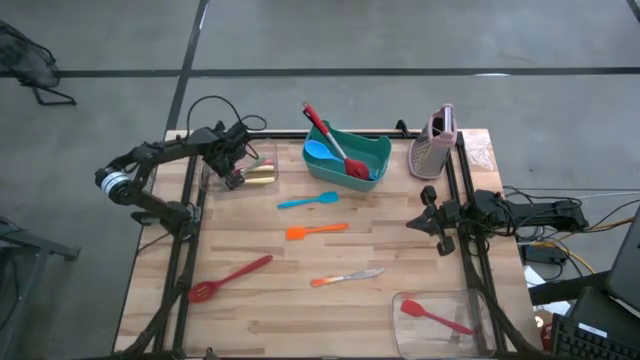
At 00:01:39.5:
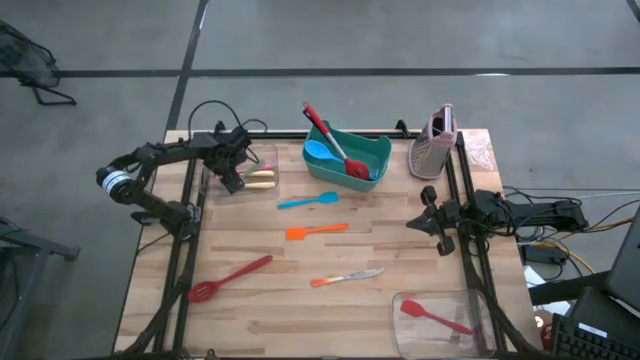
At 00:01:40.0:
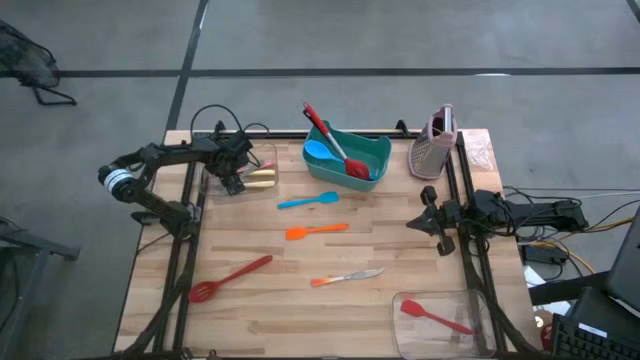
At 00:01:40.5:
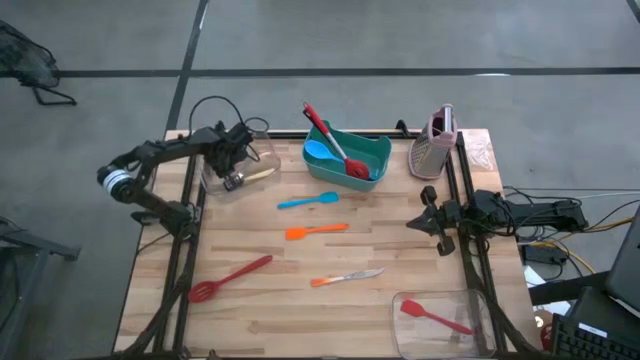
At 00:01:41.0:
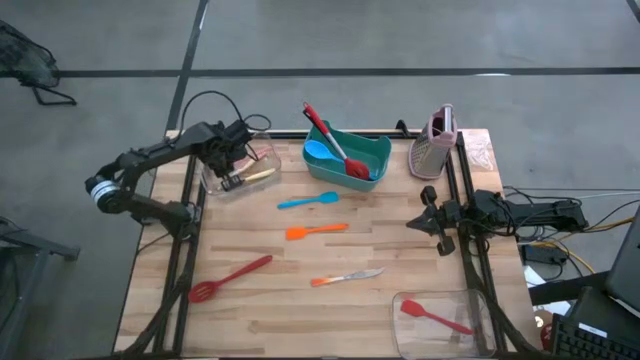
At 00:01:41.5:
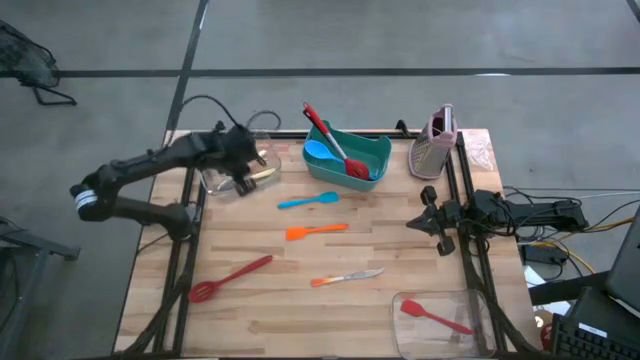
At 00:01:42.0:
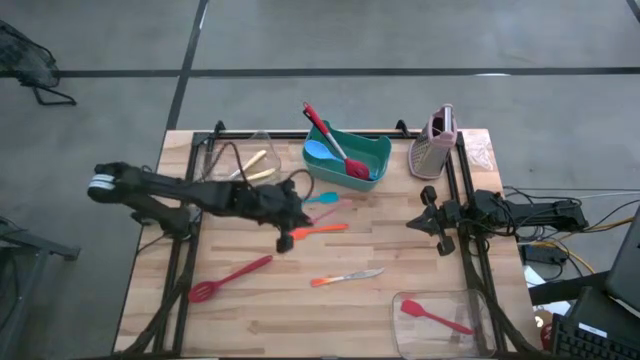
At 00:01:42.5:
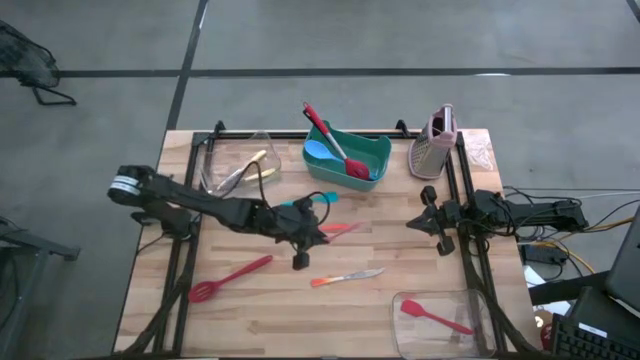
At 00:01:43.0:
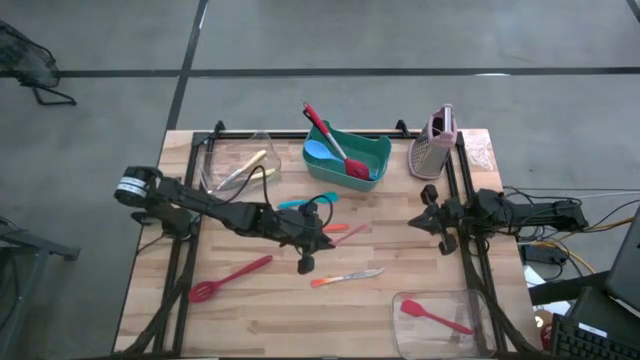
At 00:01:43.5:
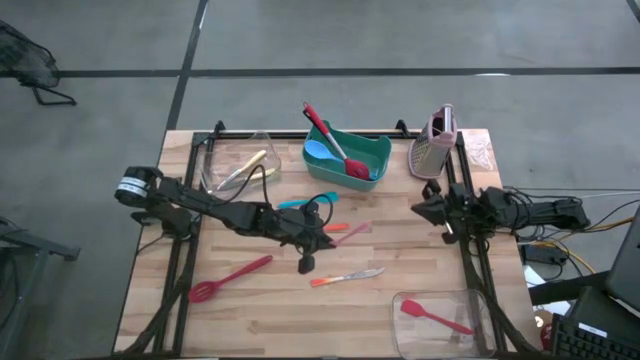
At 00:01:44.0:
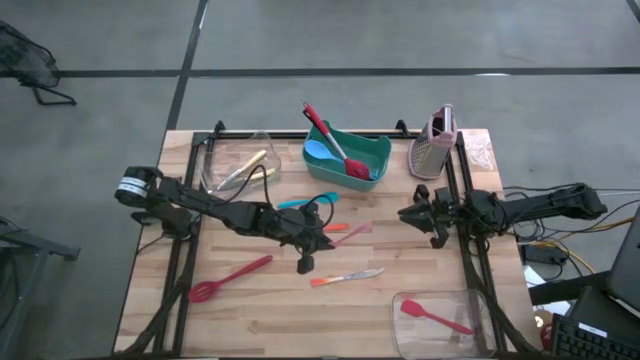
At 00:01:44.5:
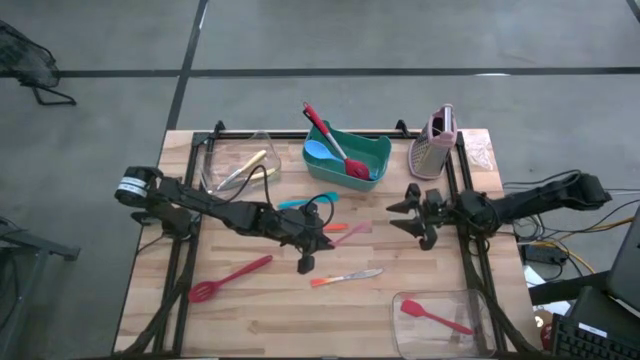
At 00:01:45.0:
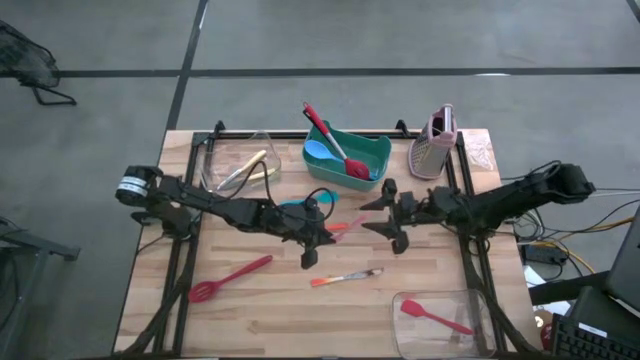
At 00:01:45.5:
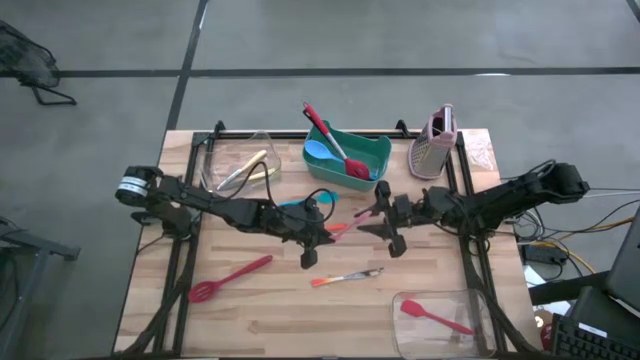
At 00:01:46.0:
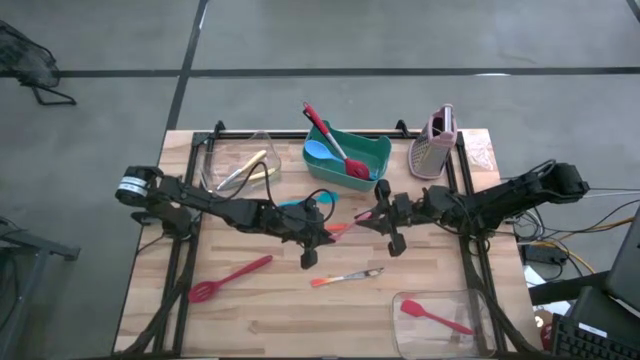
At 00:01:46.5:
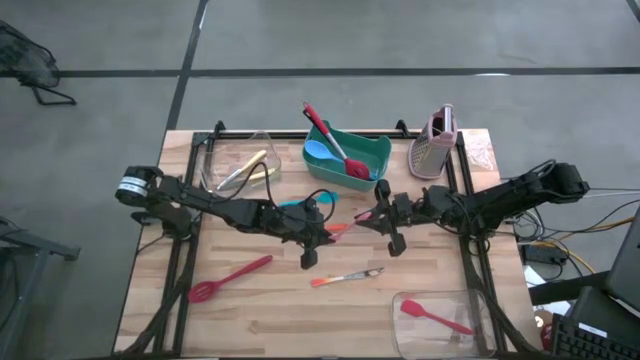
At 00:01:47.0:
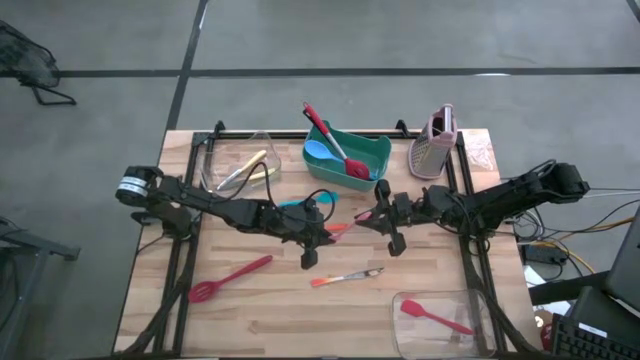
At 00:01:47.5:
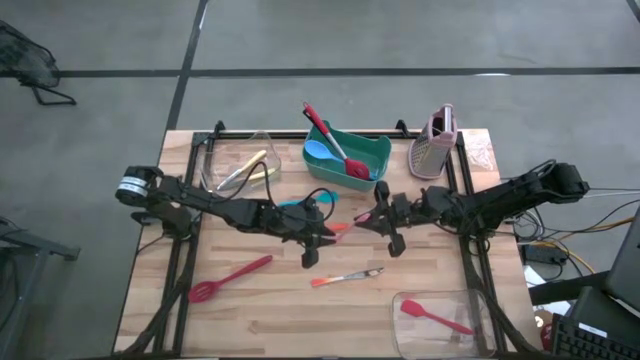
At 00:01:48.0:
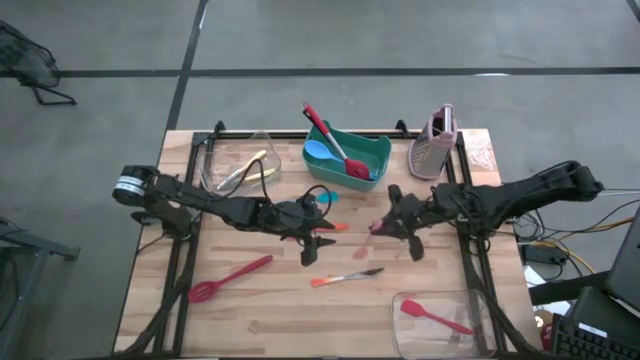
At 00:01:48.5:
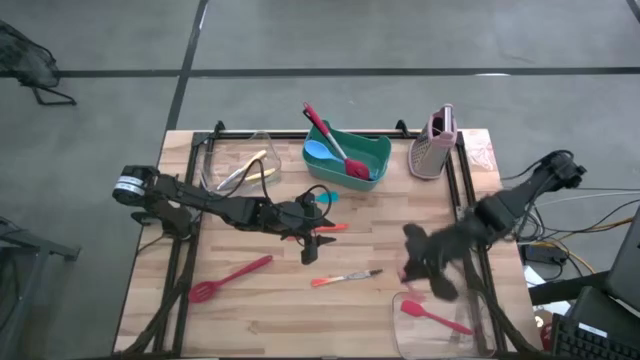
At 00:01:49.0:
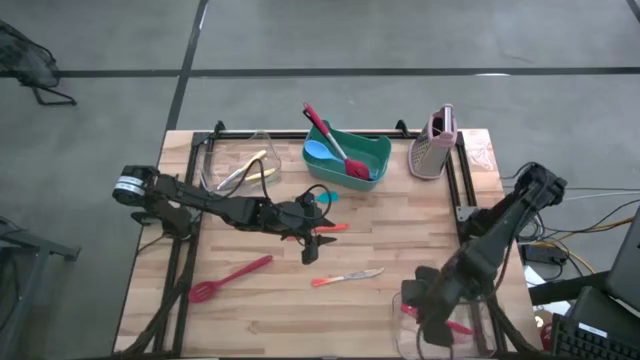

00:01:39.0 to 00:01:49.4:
Task: Pick & Place Kitchen Items
Put the pink spatula into the bottom transparent bin

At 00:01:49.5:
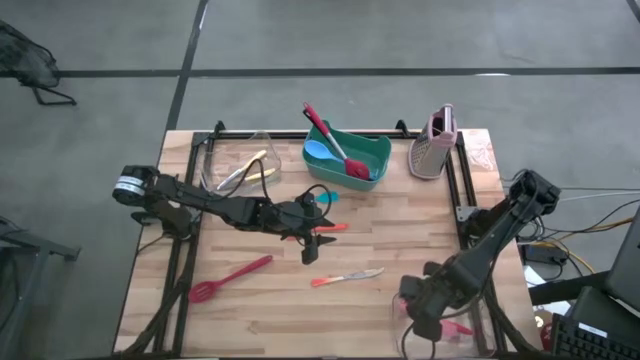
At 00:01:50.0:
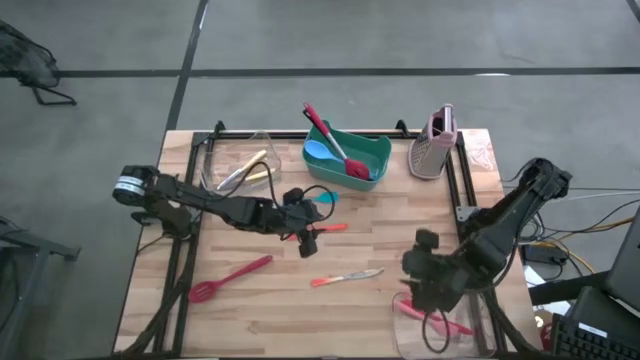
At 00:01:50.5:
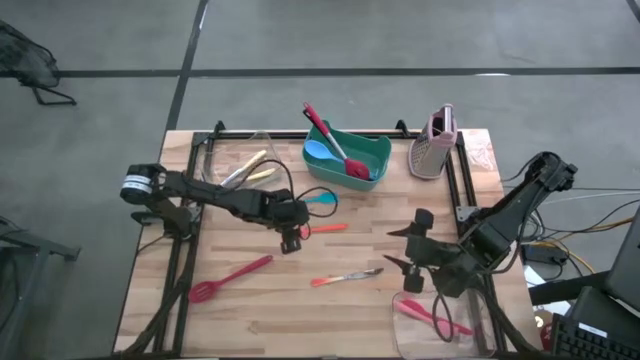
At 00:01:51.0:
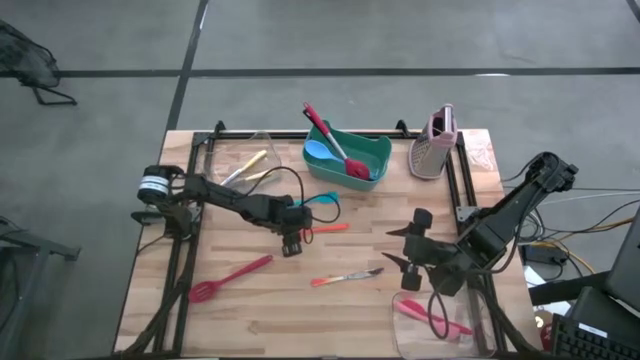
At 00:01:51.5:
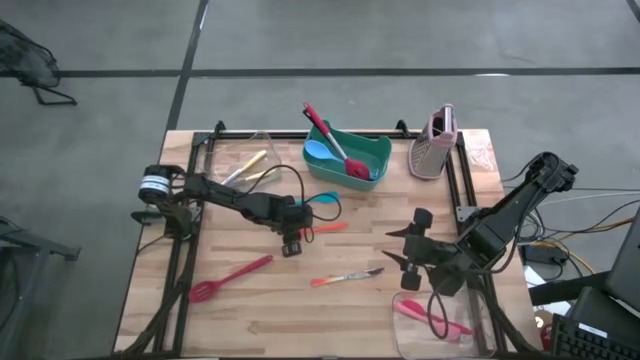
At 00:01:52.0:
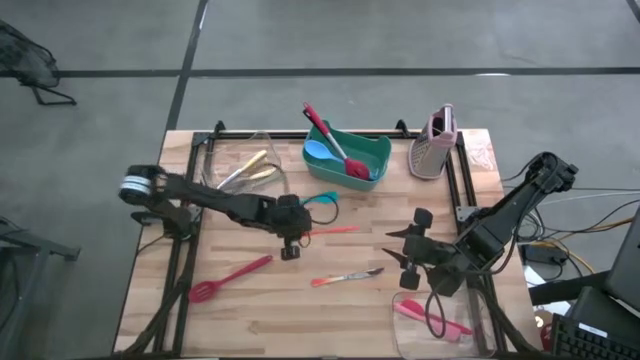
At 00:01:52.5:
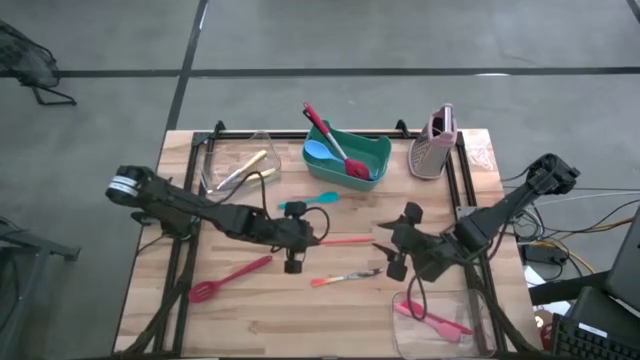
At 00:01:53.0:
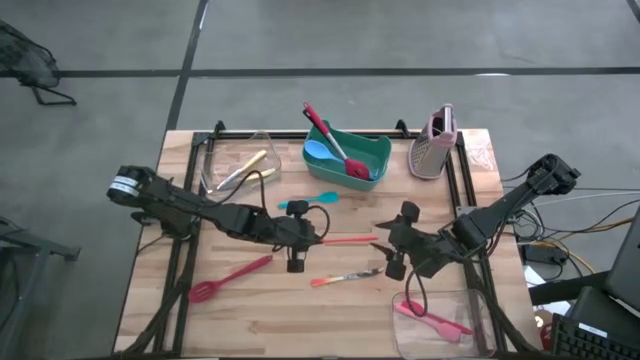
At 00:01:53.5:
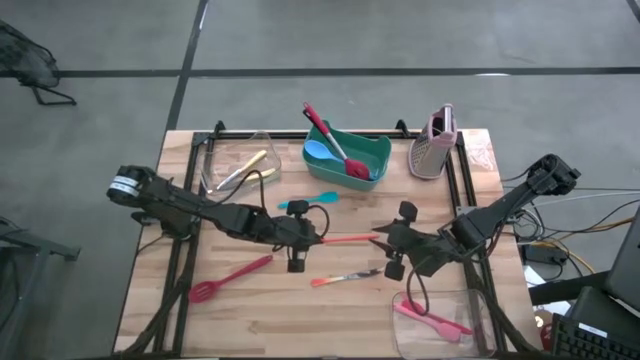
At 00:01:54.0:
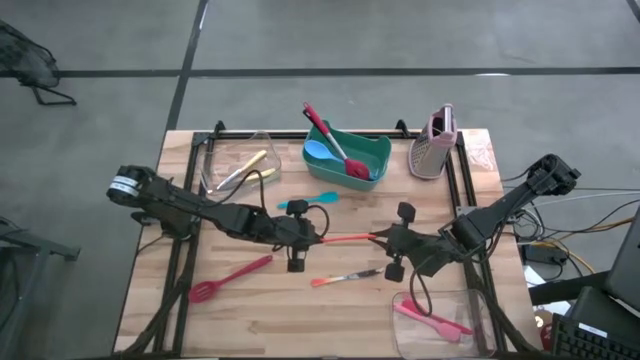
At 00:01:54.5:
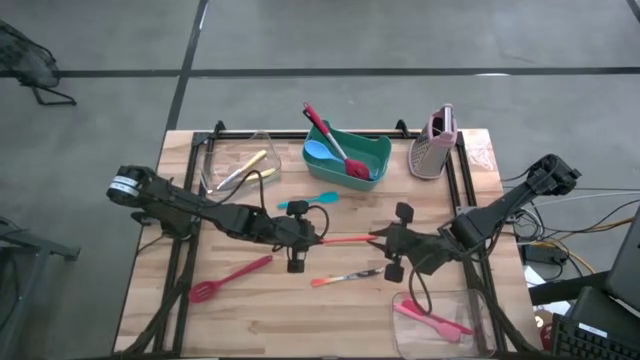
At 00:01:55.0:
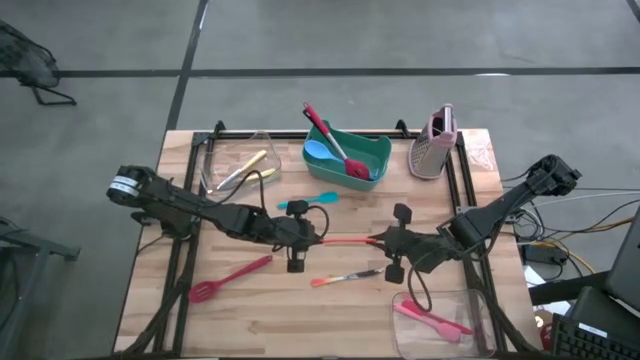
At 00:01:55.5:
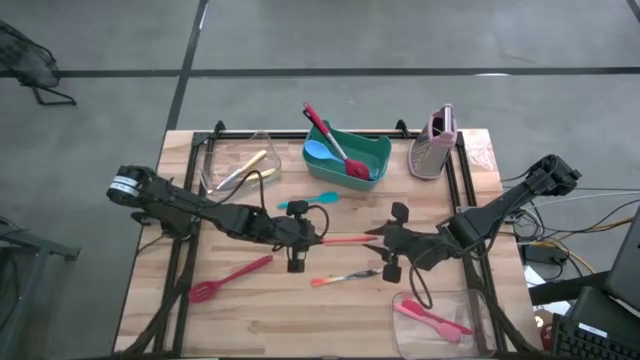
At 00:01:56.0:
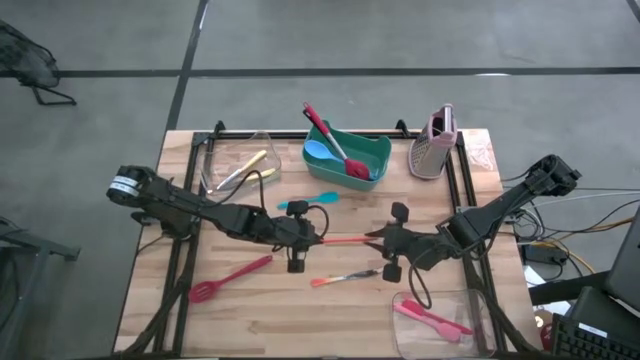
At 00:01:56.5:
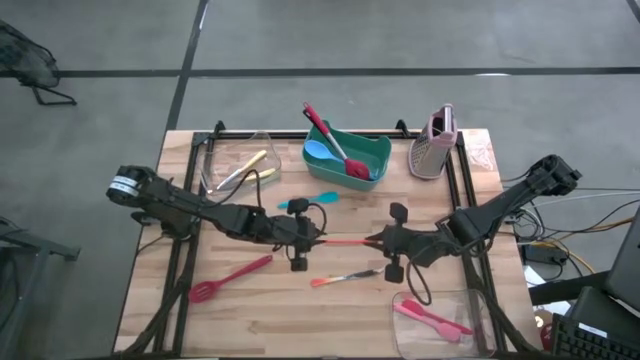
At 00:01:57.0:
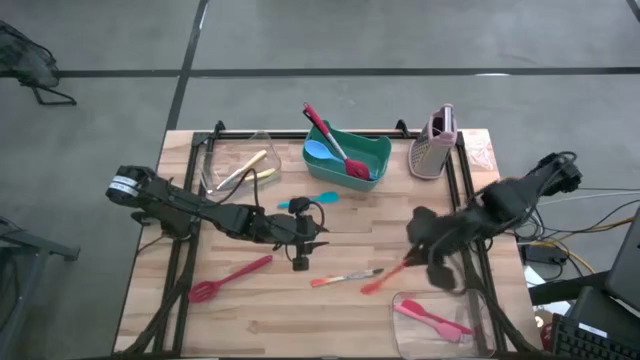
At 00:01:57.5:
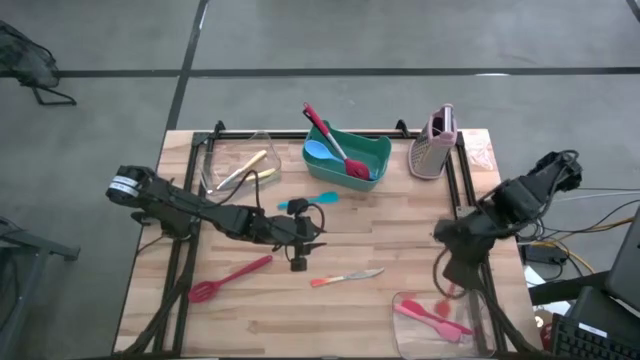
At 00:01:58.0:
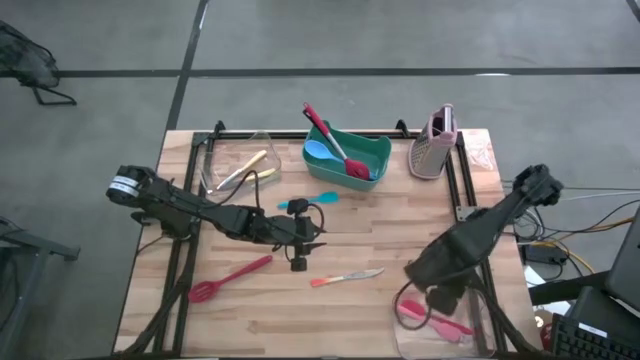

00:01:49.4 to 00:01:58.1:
Put the orange spatula into the bottom transparent bin

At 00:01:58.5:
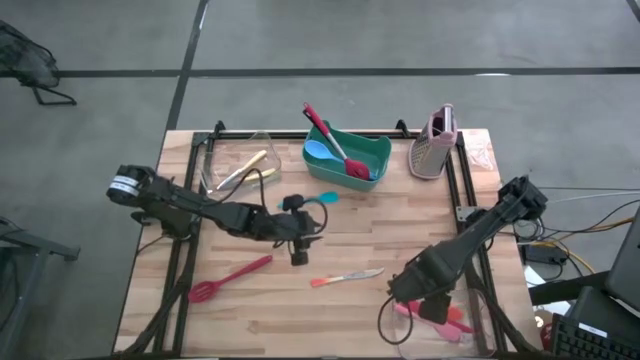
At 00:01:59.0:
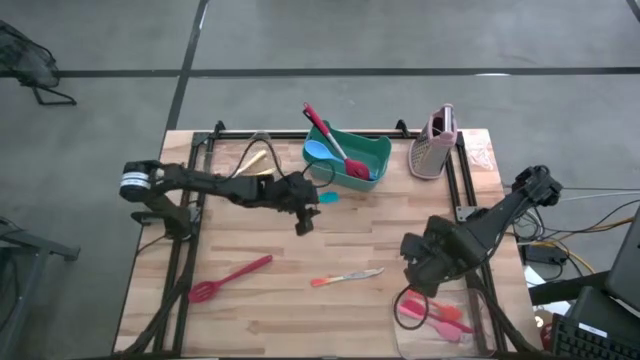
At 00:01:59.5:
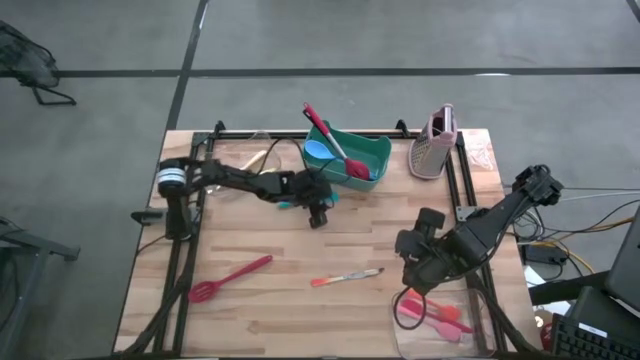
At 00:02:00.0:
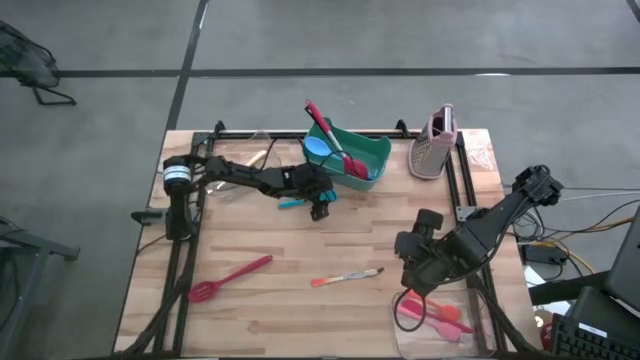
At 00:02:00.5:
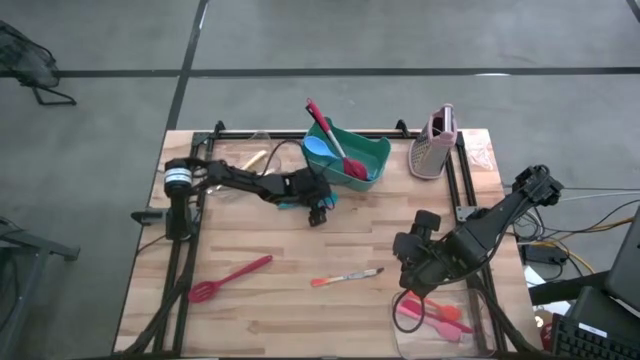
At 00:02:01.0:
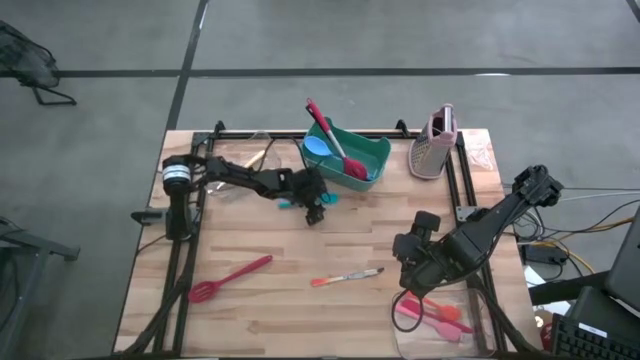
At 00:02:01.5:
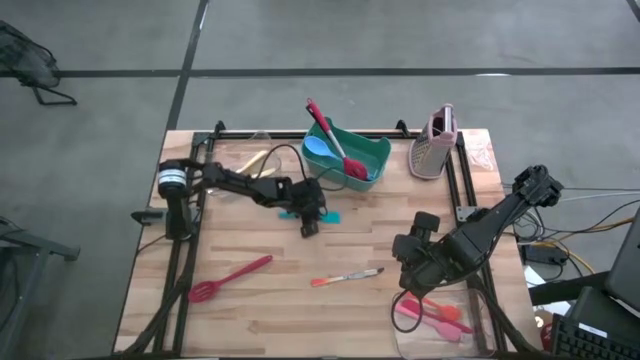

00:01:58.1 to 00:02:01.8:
Put the blue spatula into the bottom transparent bin
